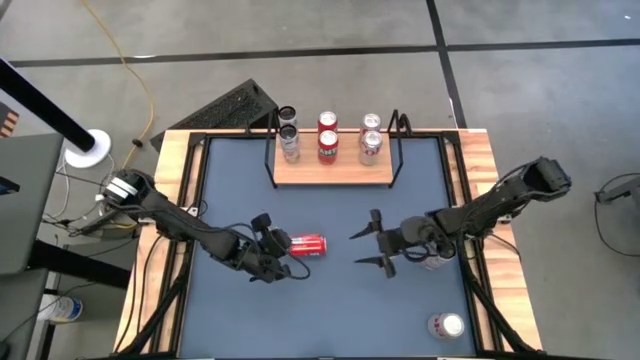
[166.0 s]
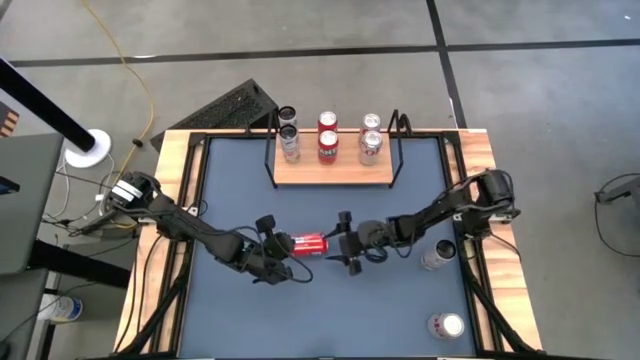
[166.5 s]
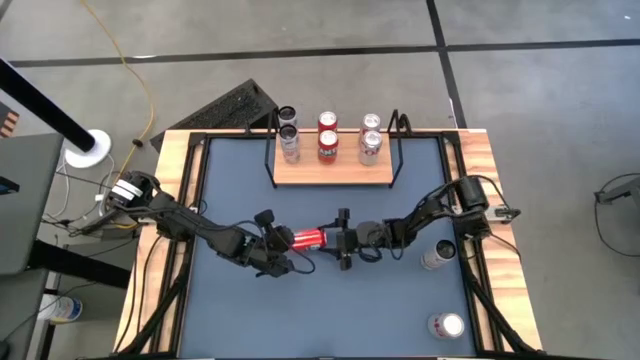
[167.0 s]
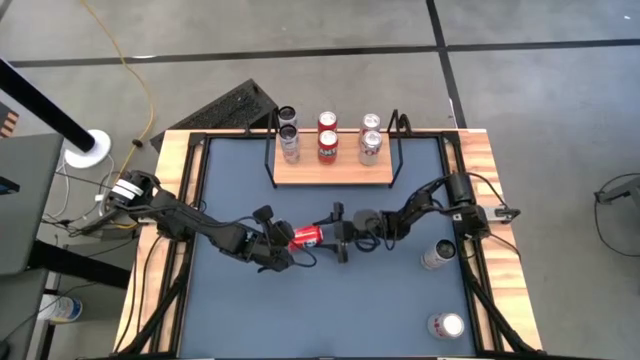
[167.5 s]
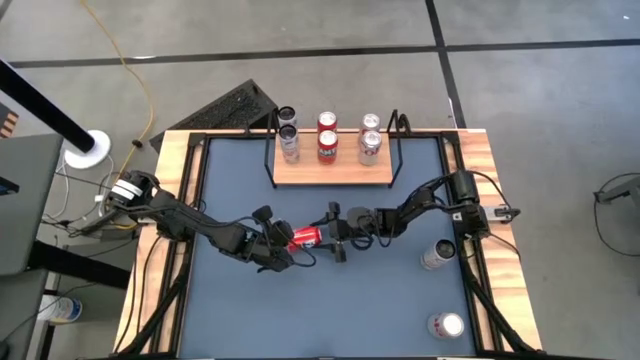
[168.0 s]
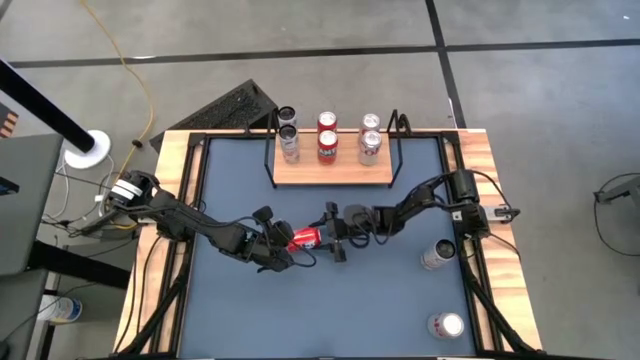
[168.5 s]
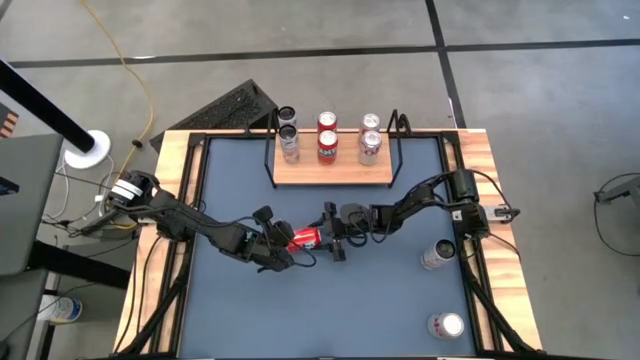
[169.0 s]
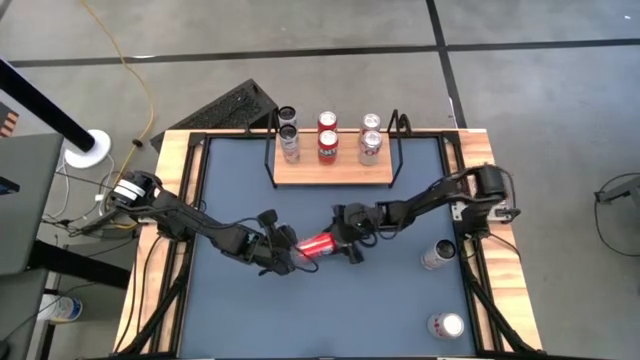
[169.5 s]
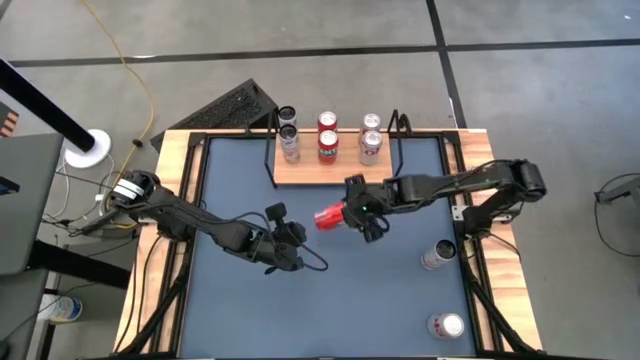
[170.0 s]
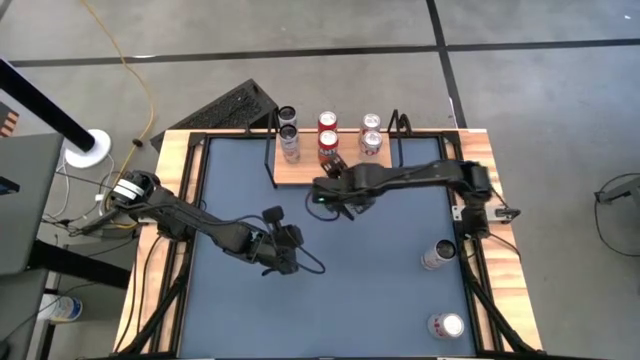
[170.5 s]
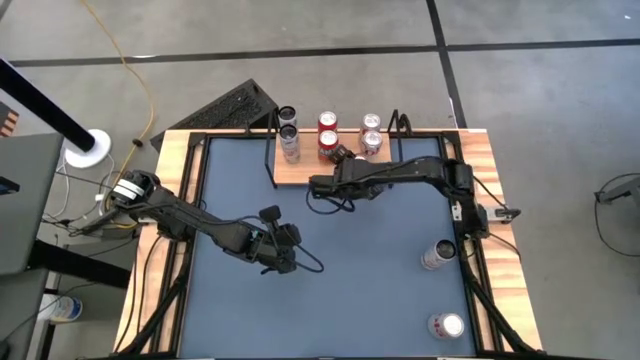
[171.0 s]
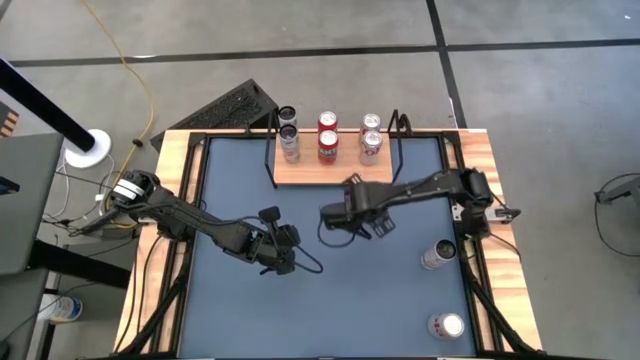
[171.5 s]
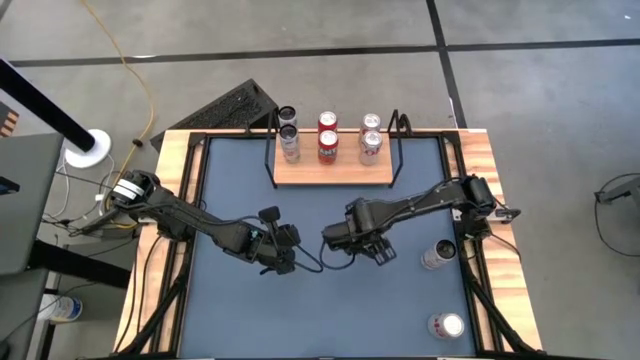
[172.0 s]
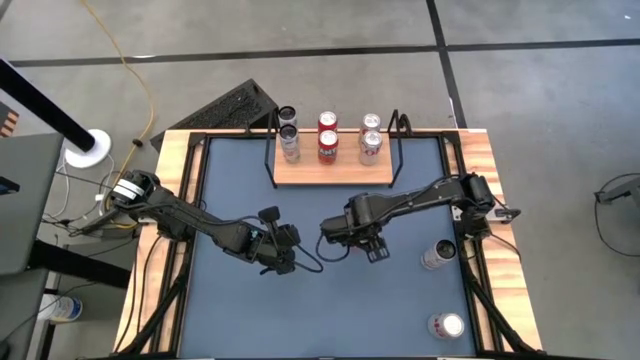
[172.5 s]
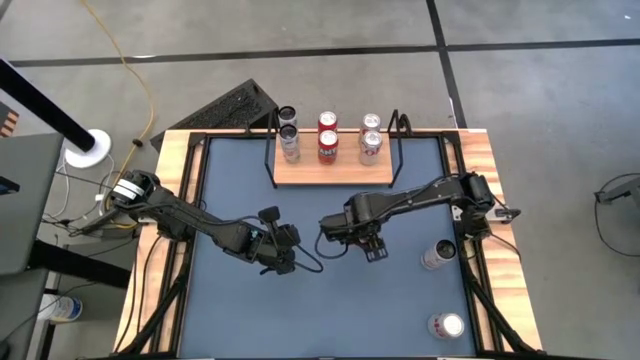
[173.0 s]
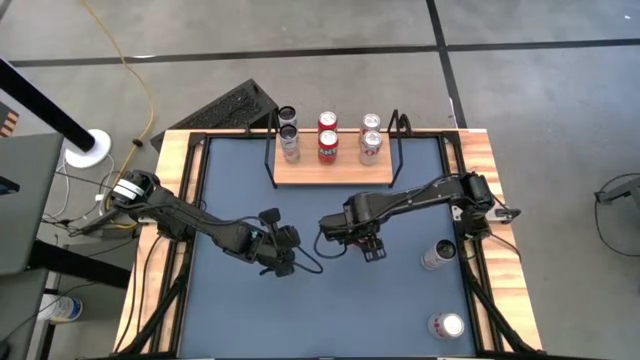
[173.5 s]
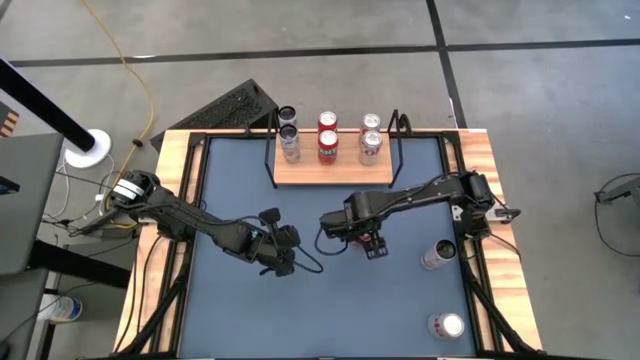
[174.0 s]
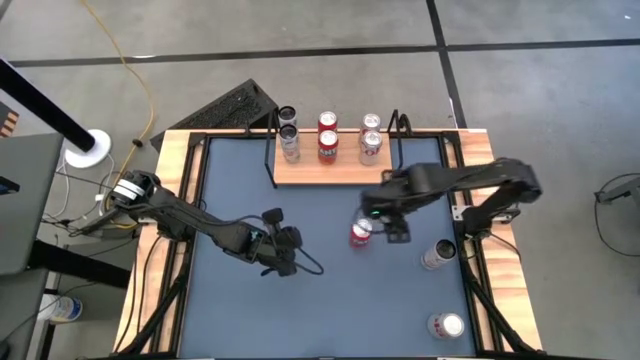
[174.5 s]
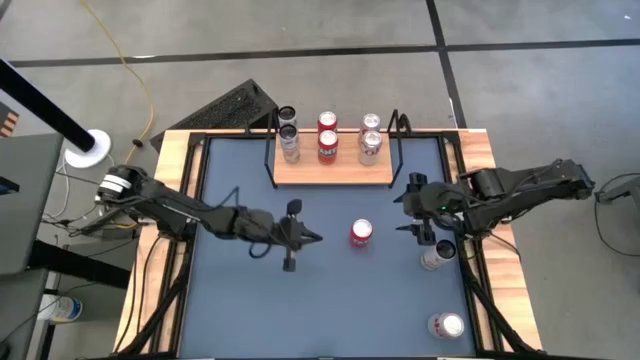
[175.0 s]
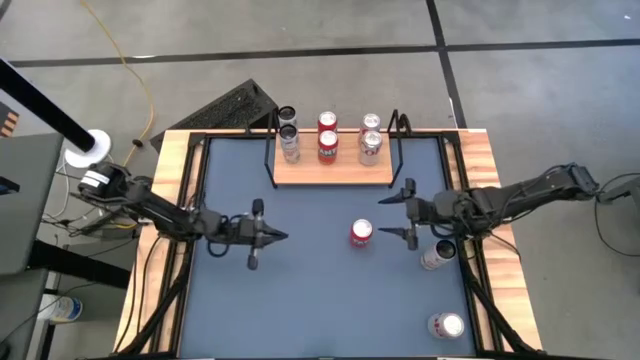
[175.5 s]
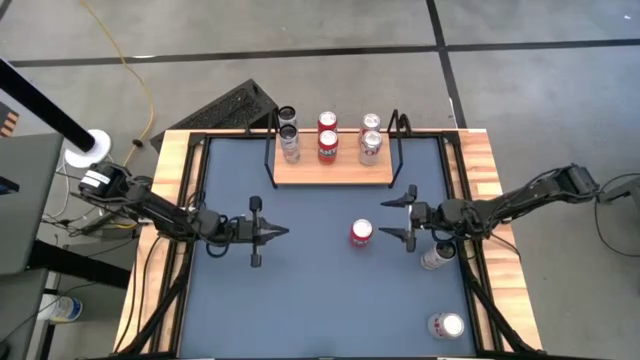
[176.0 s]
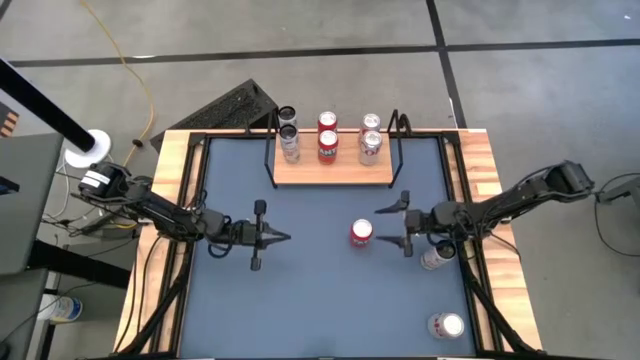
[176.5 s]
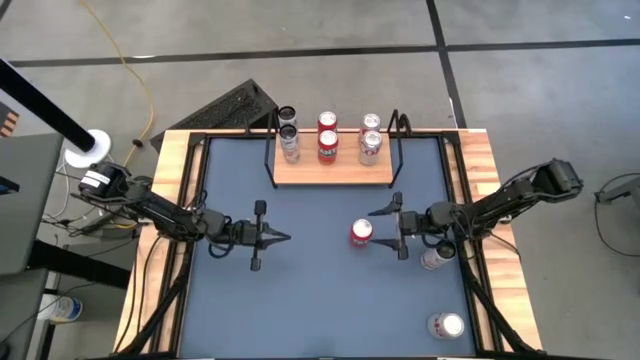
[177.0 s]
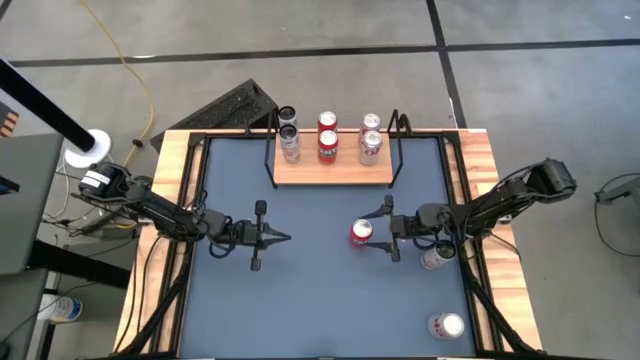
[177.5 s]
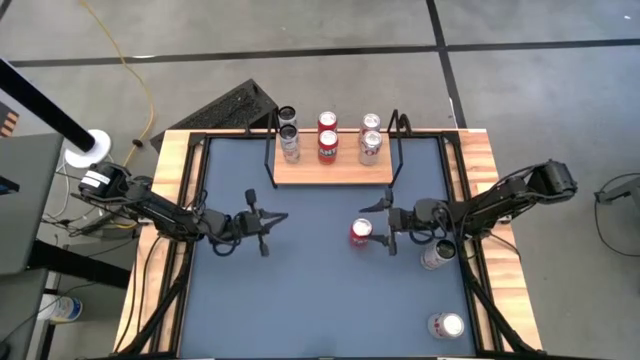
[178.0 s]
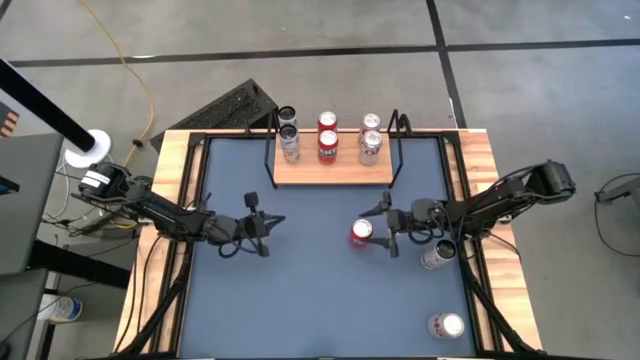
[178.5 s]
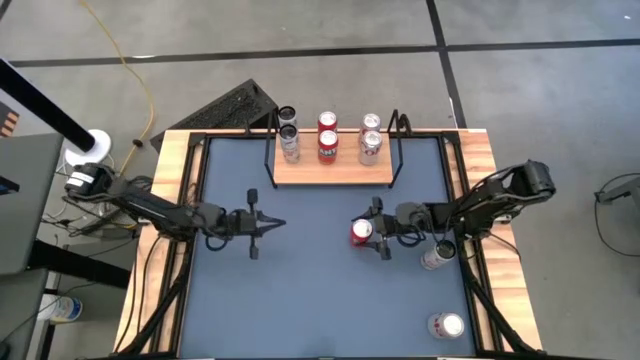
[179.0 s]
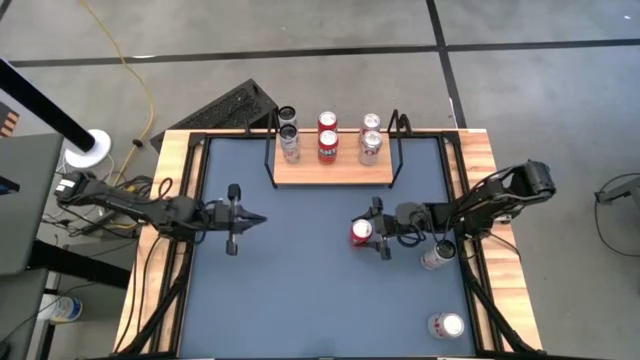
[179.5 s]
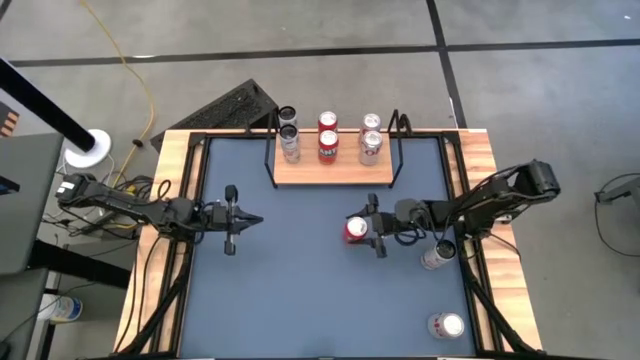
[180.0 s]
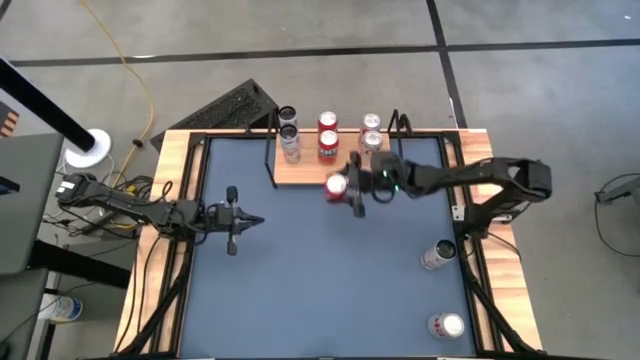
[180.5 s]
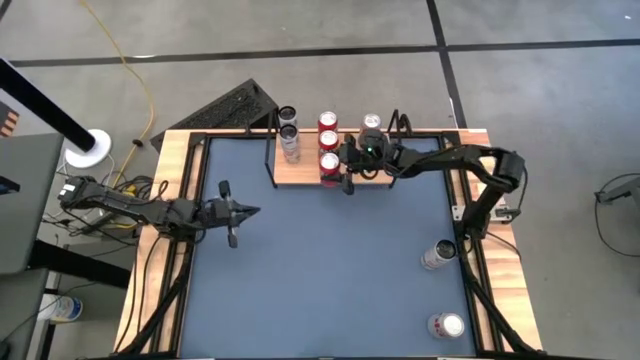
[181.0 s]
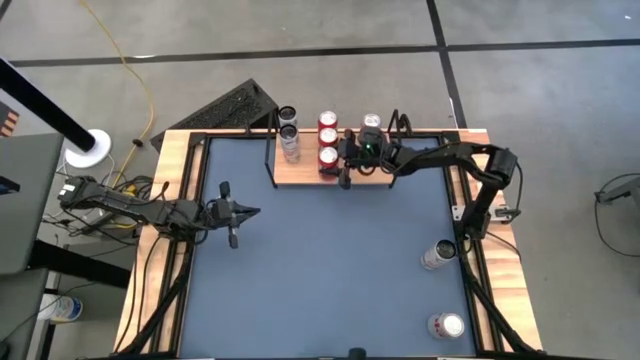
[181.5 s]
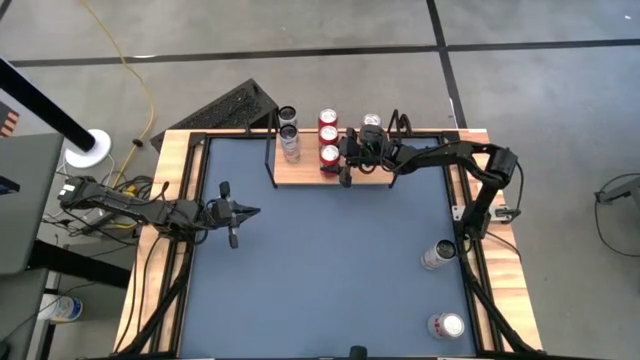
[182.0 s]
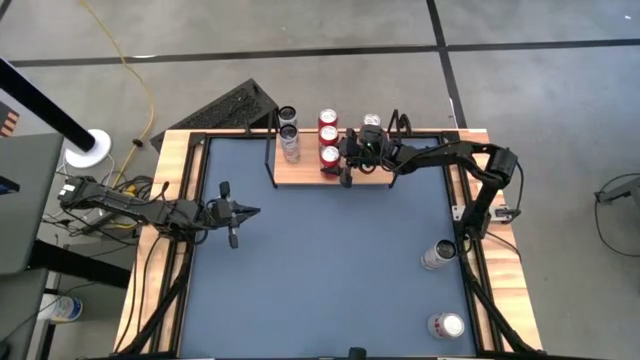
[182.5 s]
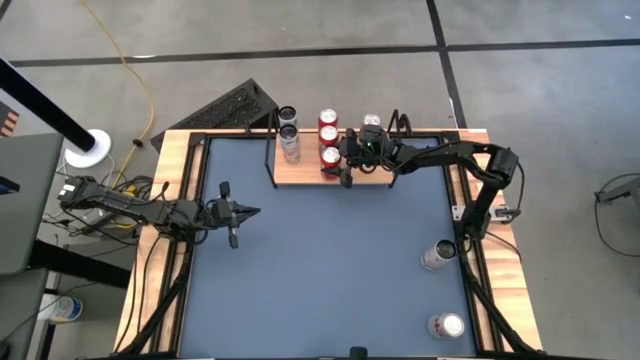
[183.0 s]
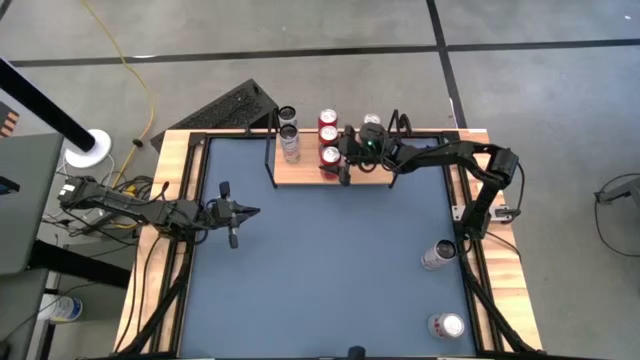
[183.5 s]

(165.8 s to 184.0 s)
Task: Place canned beverage on shelf
Put the red soda can on the shelf aligned with the other red soda cans

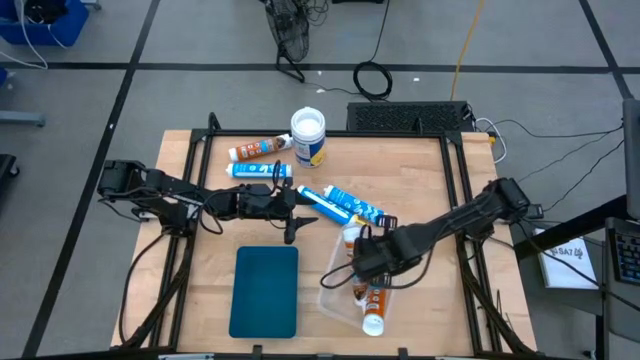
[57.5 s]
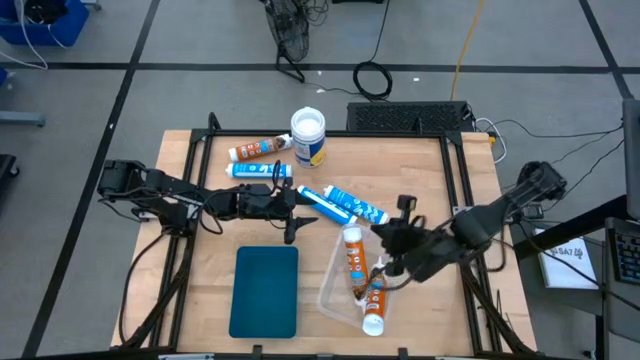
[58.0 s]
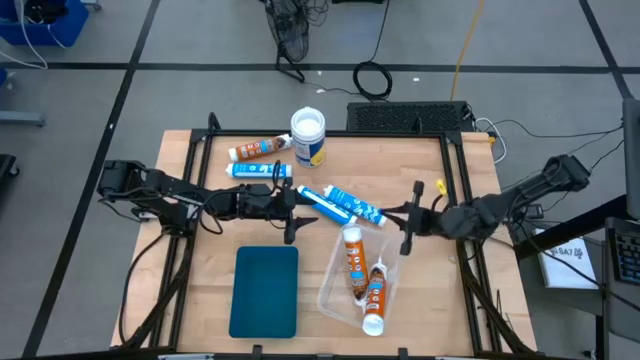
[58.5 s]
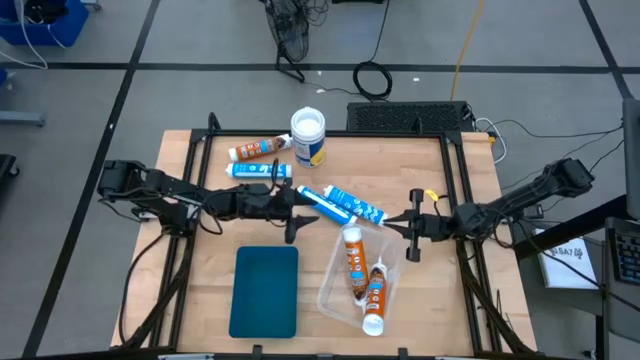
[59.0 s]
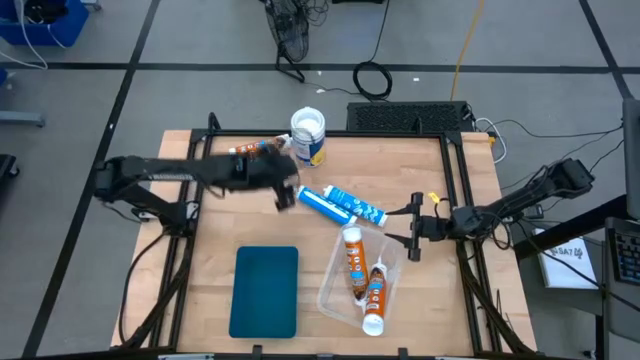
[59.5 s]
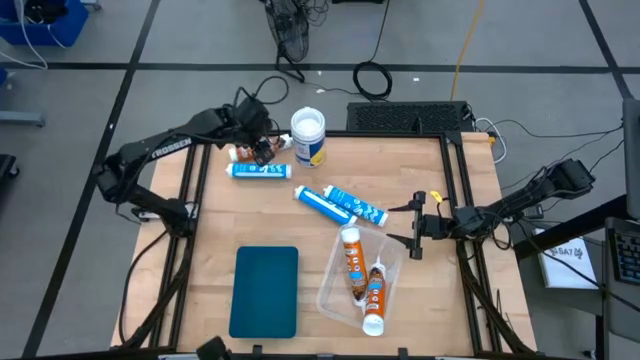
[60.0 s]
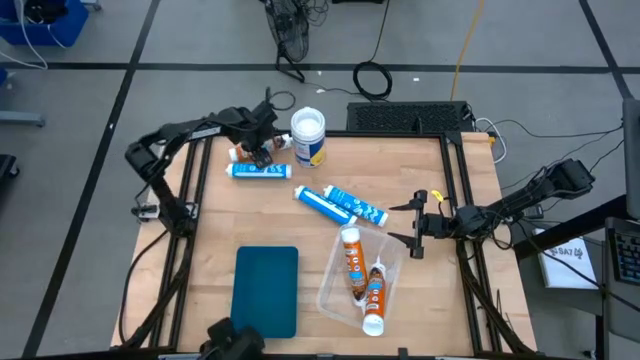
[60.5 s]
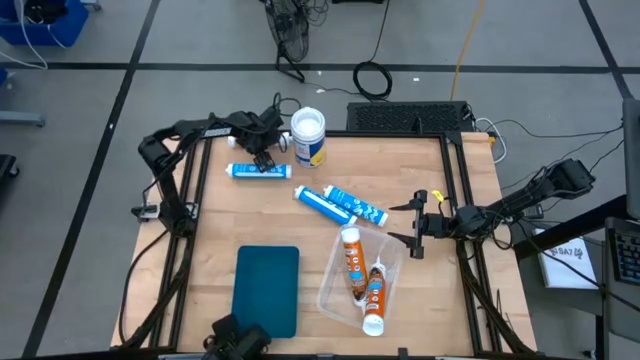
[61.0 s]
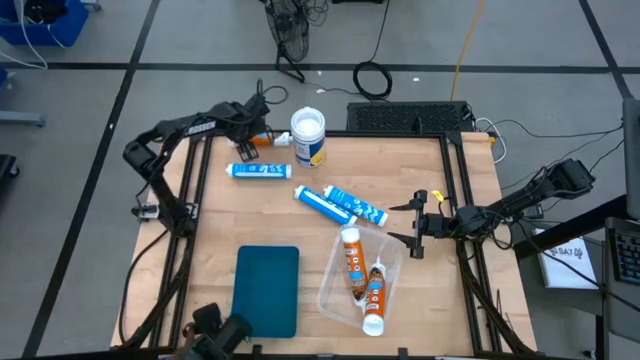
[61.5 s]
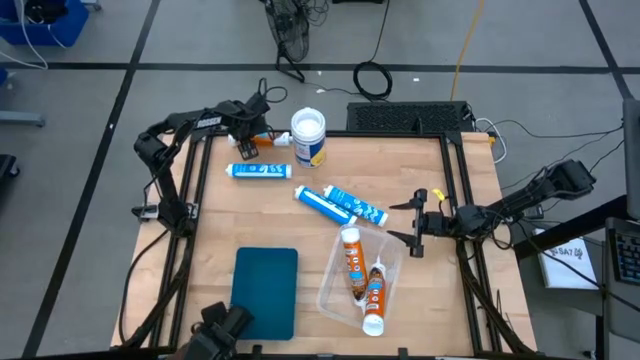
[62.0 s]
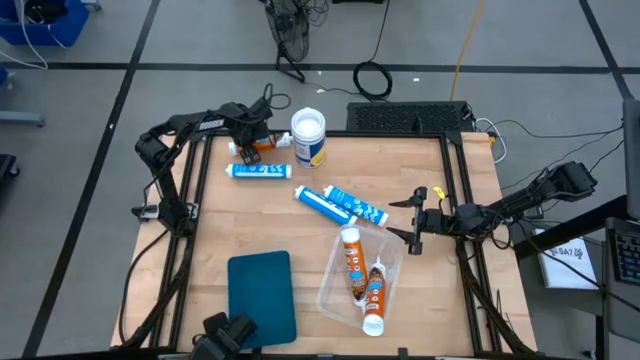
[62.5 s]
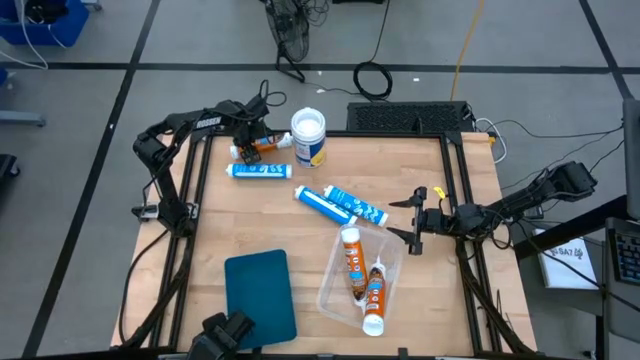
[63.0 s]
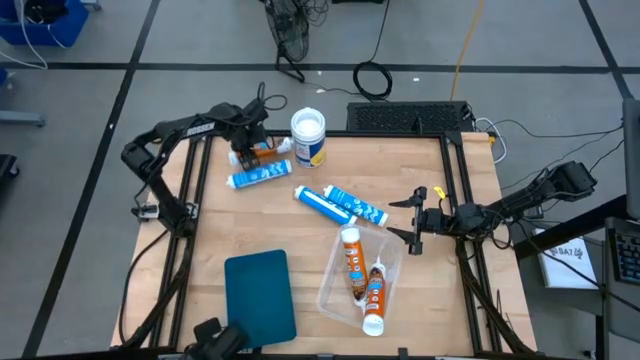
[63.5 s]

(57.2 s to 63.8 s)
Task: Pick & place silicon tubes, Sealant and Lysol wipes
Put the orange sealant into the white bin
